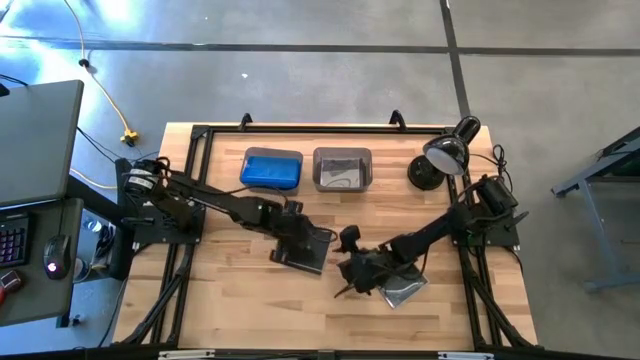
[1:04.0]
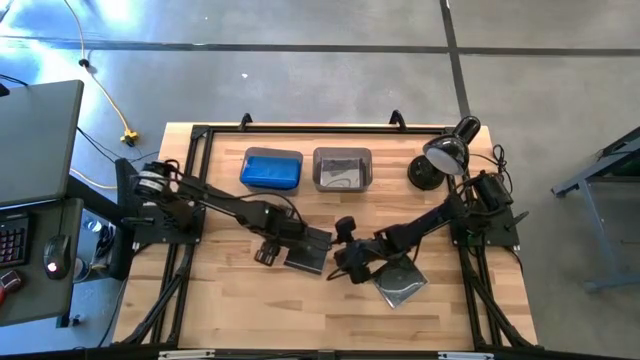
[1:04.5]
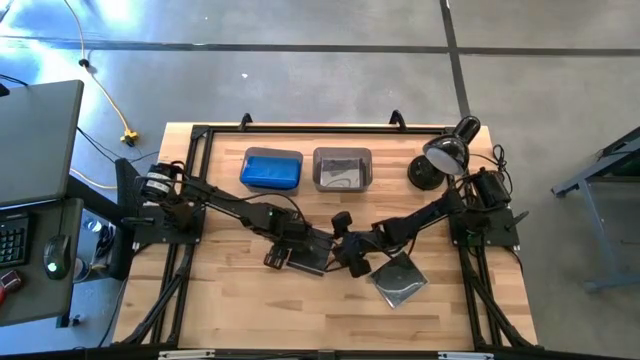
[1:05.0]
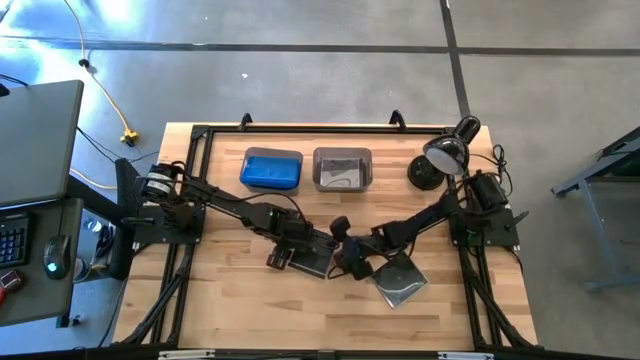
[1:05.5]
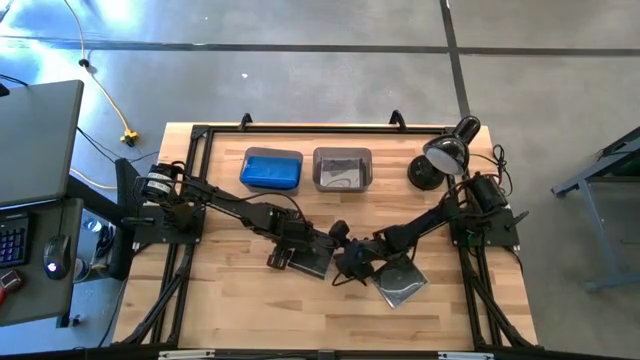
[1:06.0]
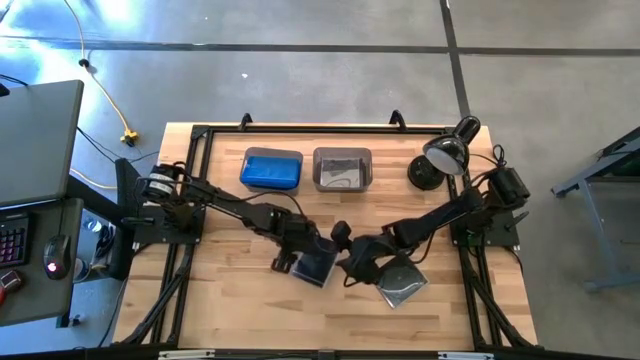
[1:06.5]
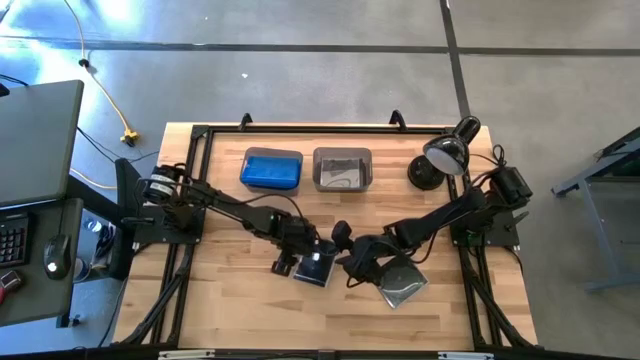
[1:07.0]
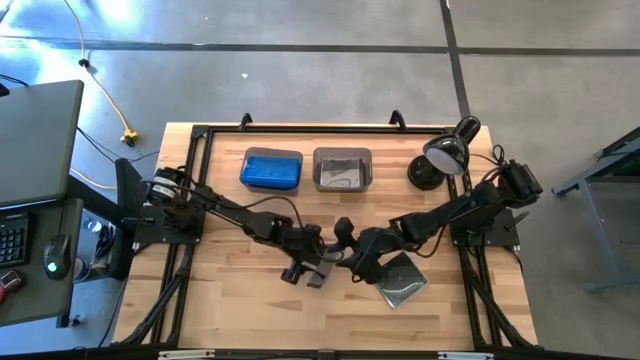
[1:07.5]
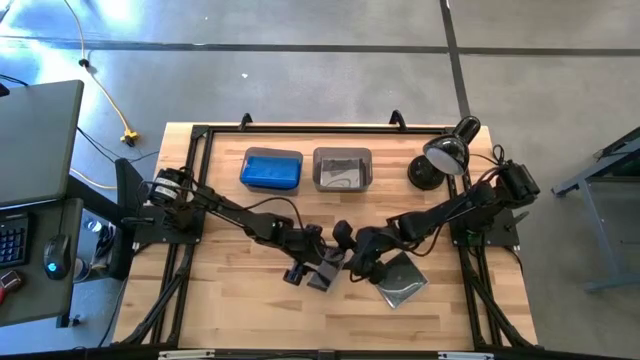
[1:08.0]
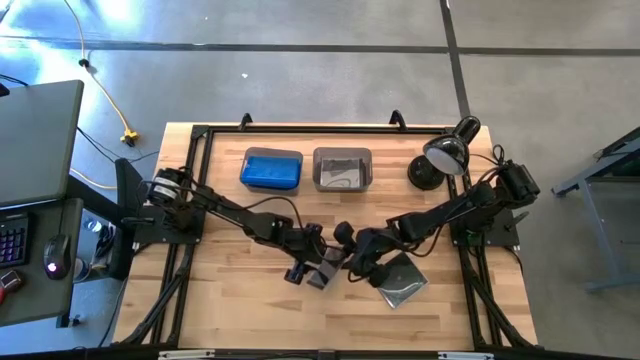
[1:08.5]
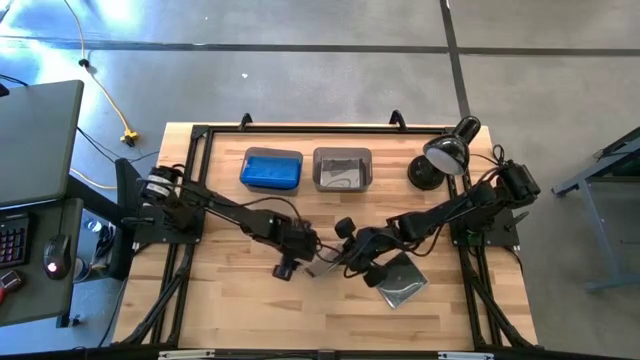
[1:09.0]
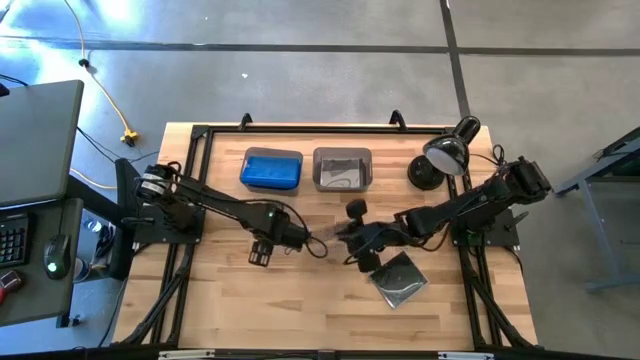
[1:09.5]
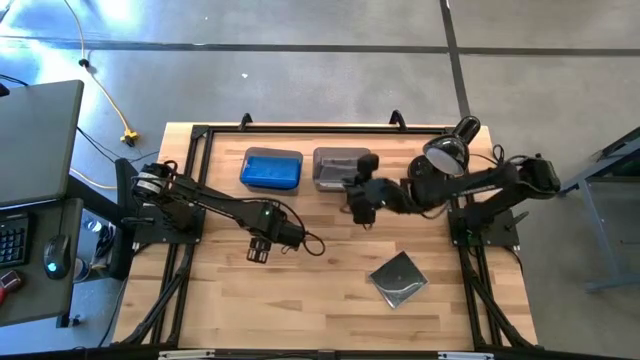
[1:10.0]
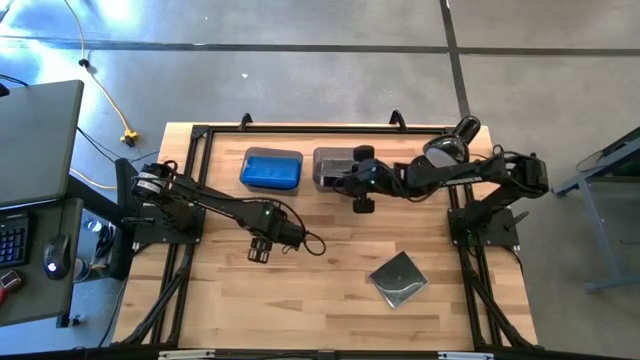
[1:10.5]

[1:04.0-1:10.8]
Task: Pick & place jewel cases by type
Put the top black CD case into the right black bin

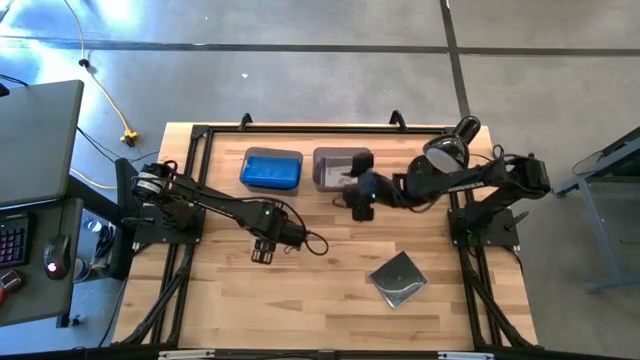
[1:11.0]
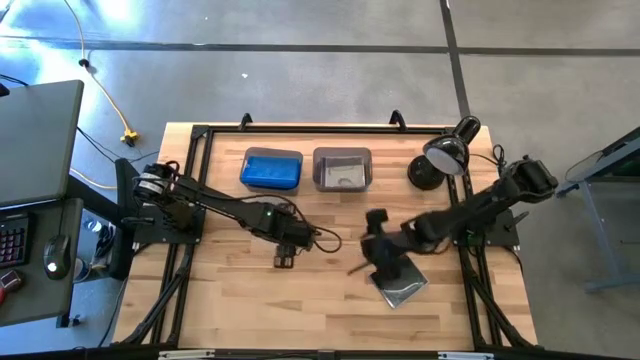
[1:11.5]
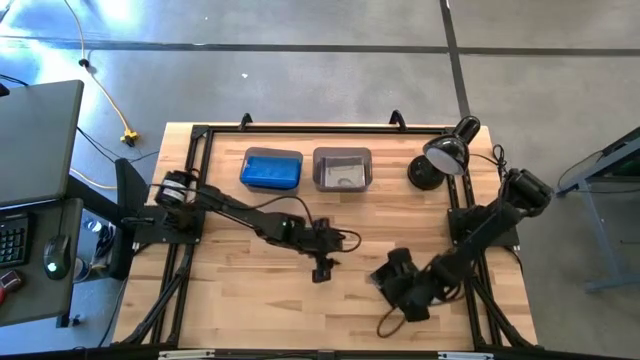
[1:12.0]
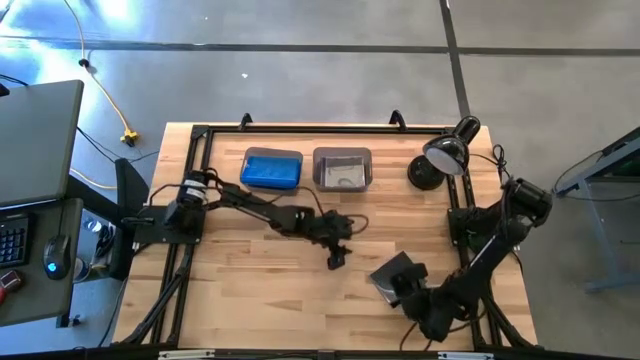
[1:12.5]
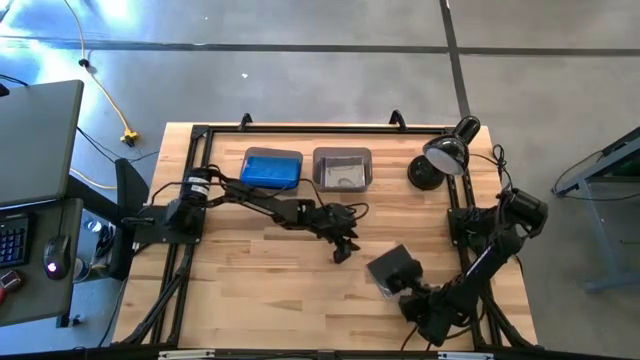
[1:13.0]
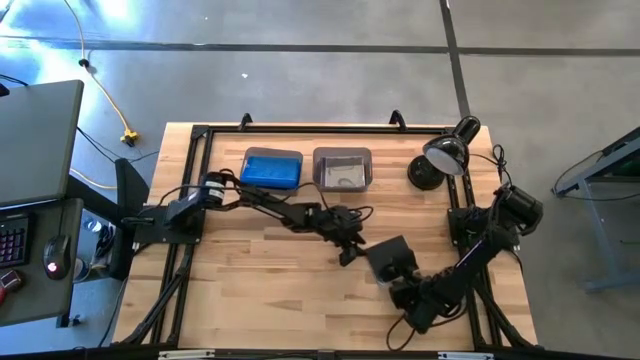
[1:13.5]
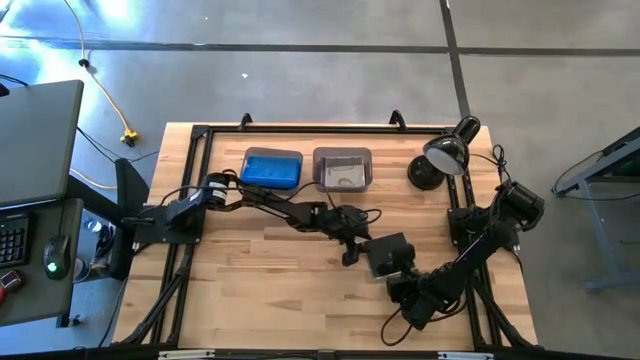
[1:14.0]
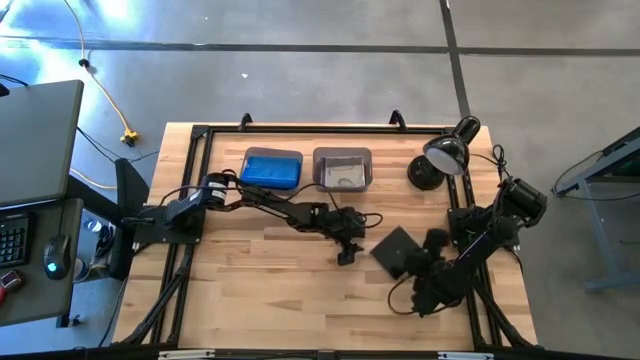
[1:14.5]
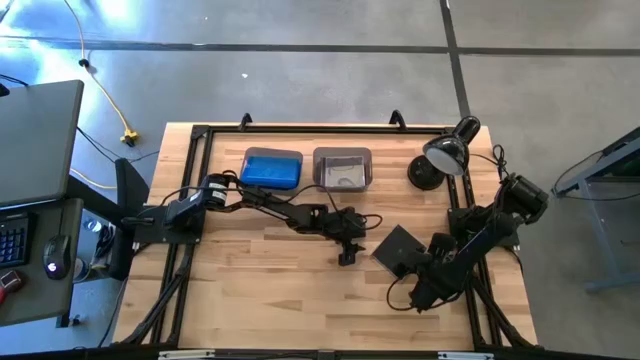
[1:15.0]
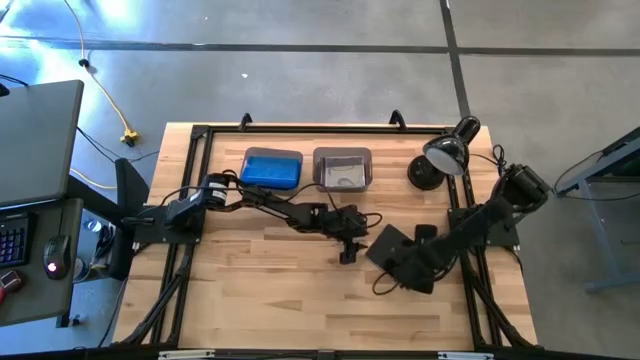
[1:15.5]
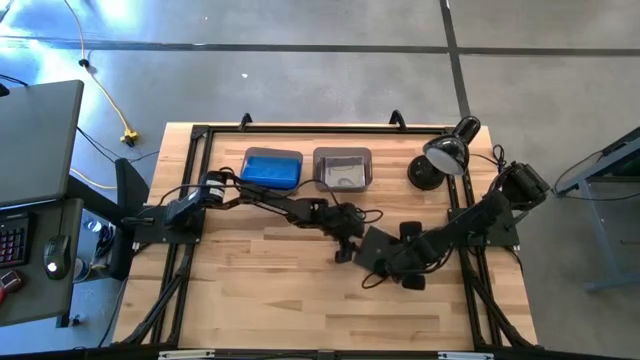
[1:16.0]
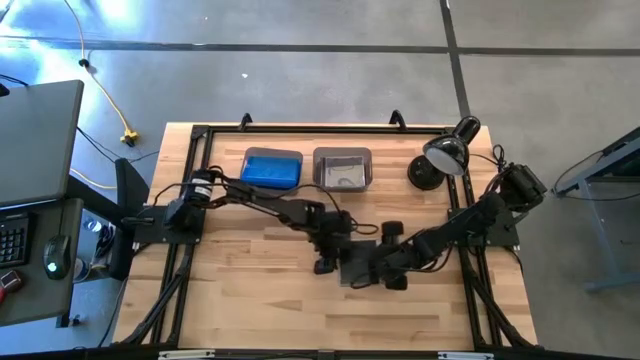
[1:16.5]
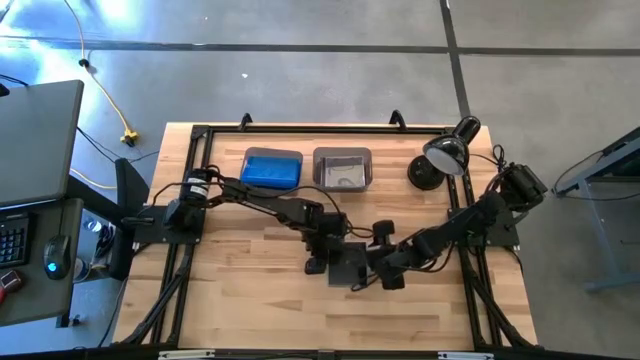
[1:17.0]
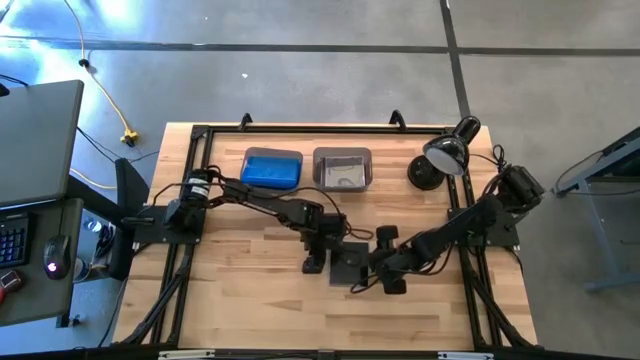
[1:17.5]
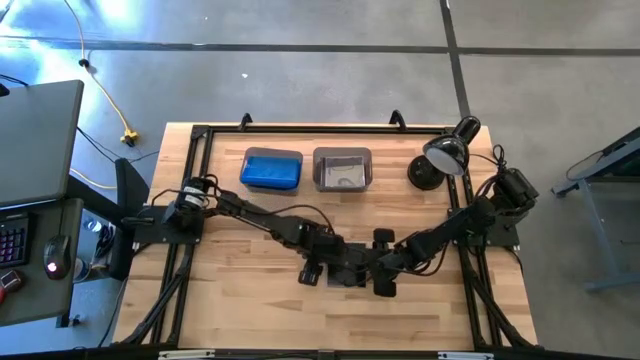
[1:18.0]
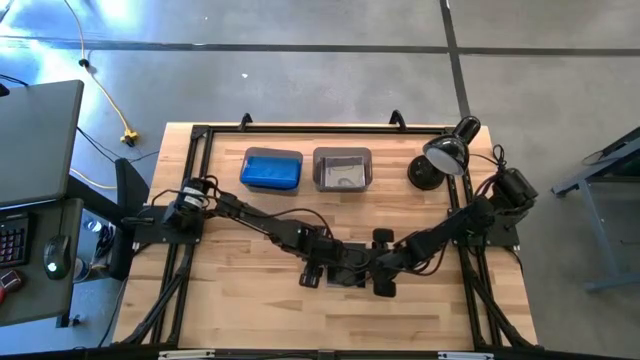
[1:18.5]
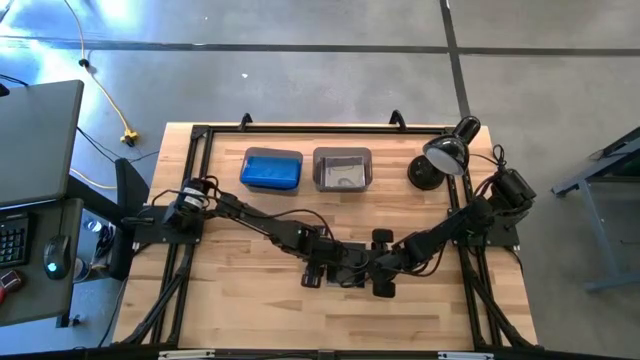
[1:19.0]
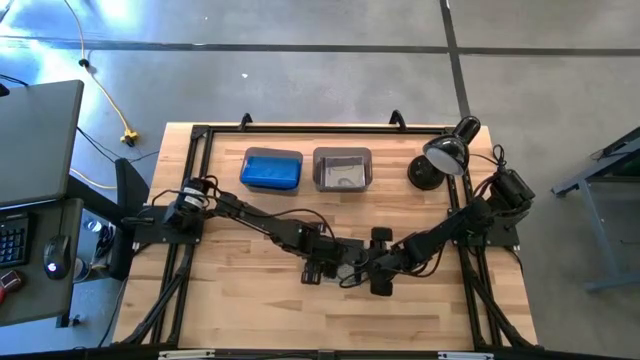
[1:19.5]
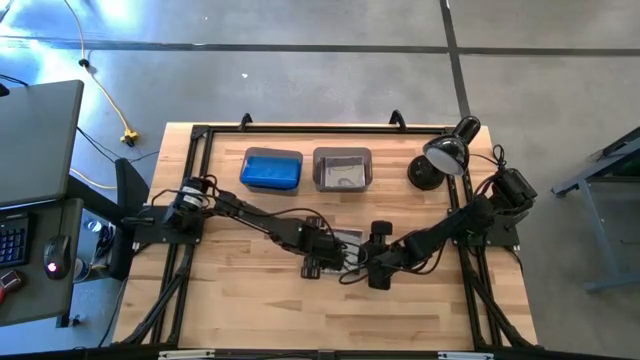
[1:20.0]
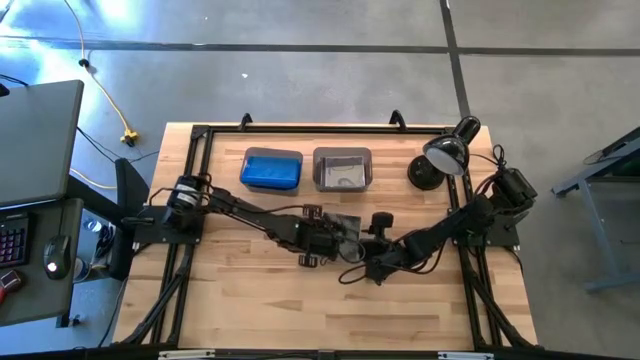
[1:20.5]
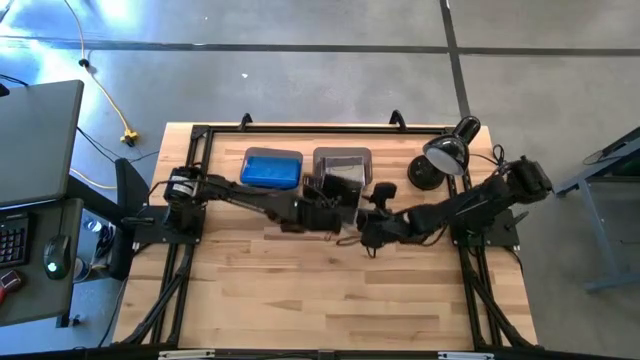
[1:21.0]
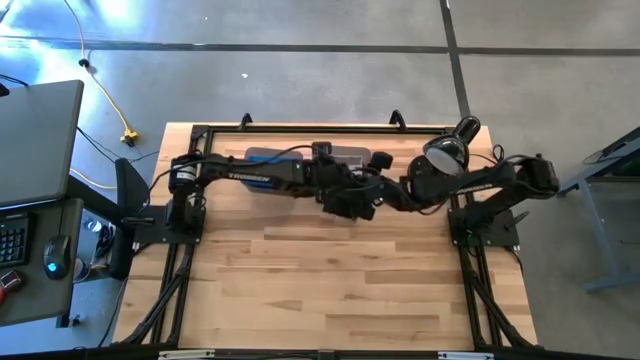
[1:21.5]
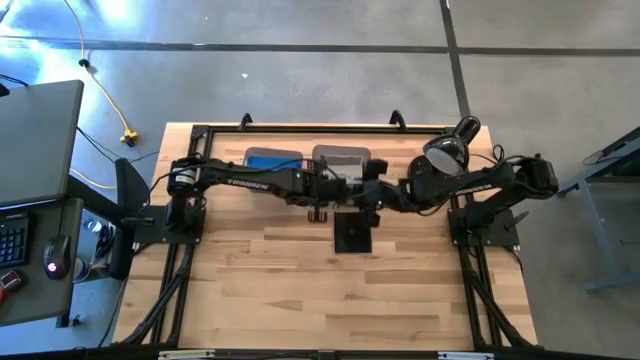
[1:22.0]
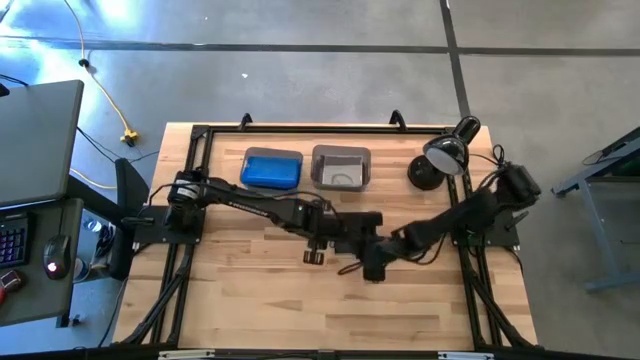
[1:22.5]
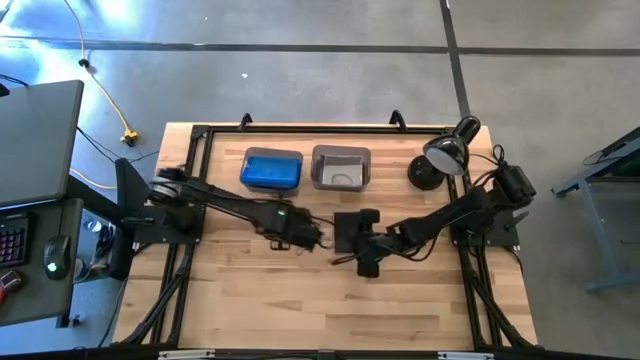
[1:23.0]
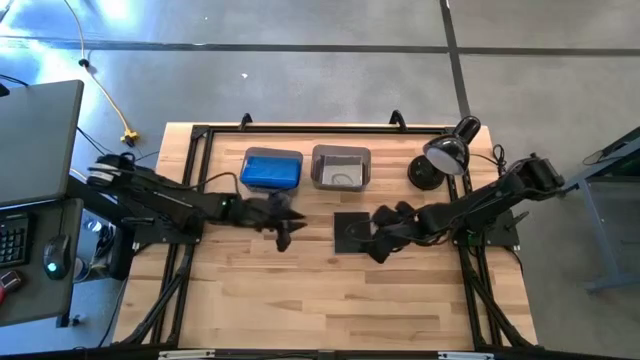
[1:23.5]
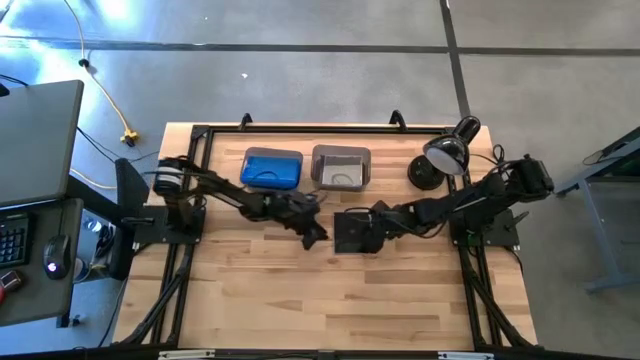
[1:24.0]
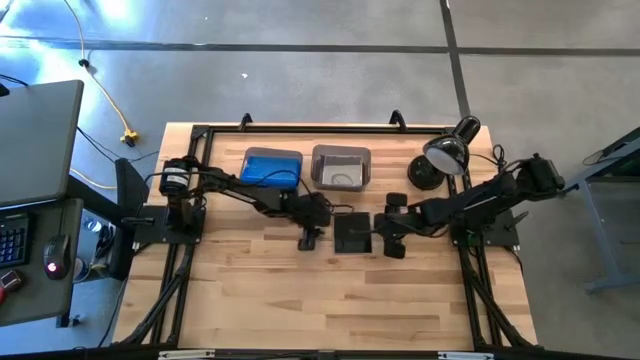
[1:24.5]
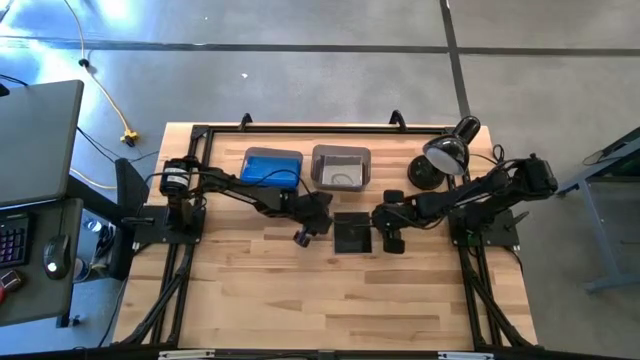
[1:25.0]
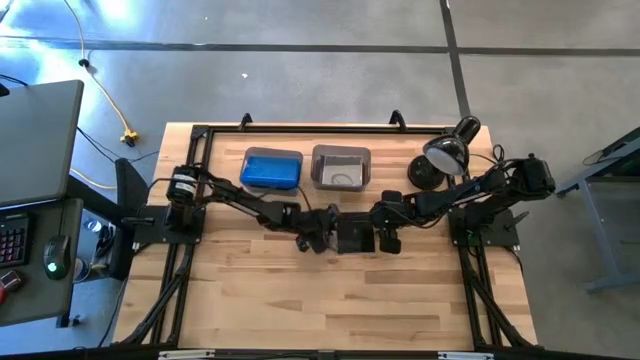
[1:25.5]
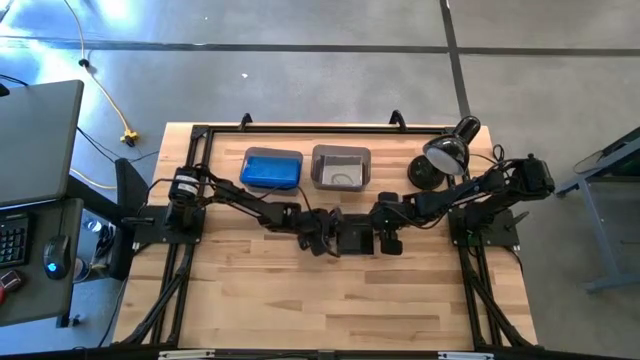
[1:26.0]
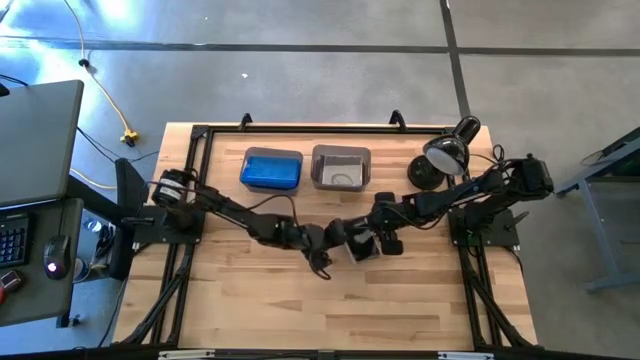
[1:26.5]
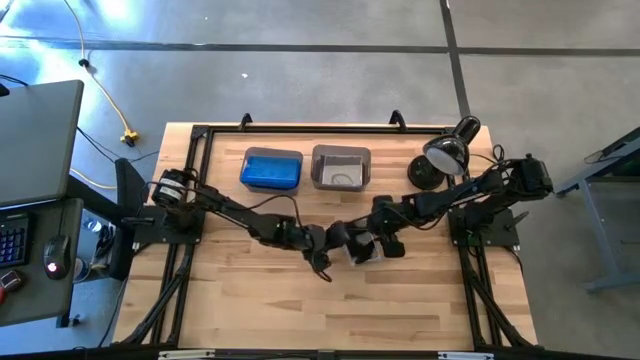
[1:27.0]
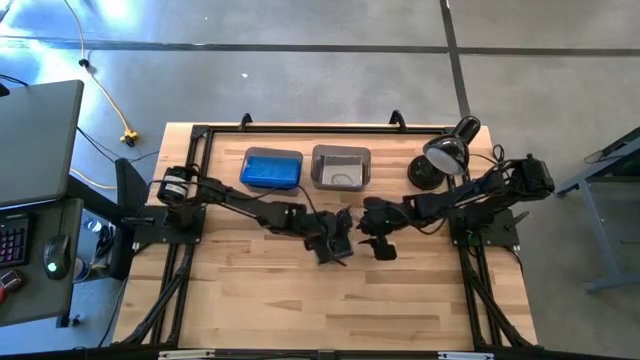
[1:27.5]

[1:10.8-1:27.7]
Put the black CD case into the right black bin
